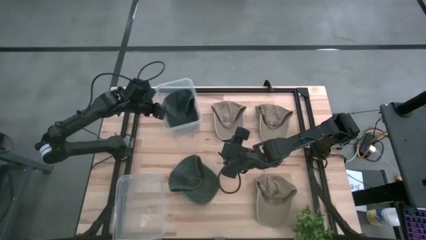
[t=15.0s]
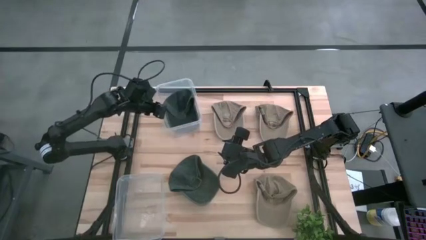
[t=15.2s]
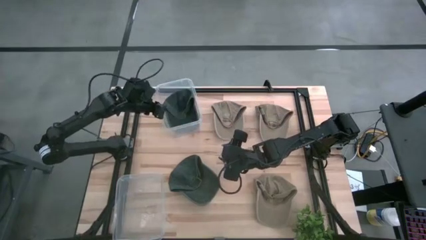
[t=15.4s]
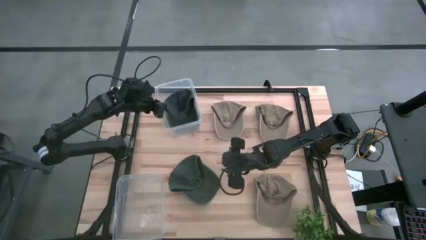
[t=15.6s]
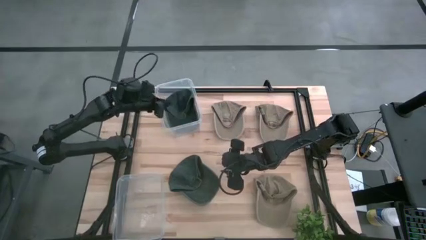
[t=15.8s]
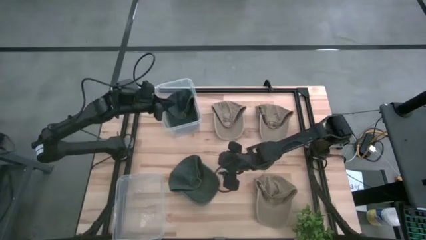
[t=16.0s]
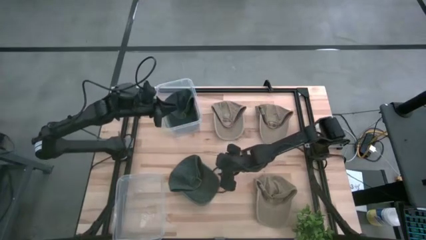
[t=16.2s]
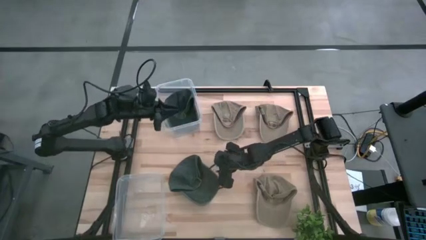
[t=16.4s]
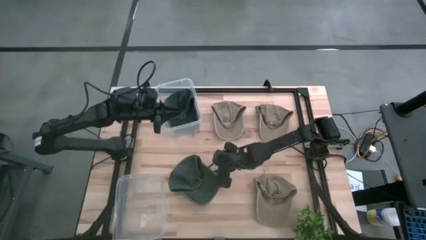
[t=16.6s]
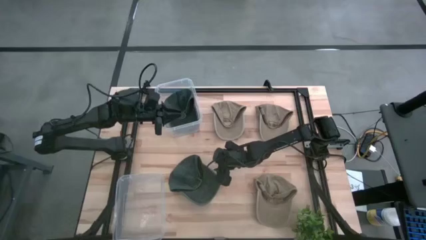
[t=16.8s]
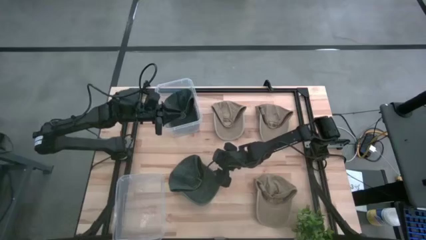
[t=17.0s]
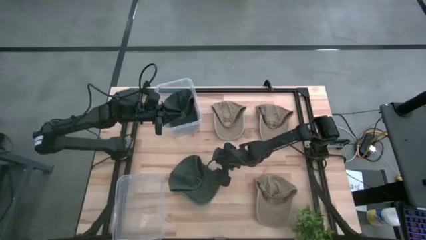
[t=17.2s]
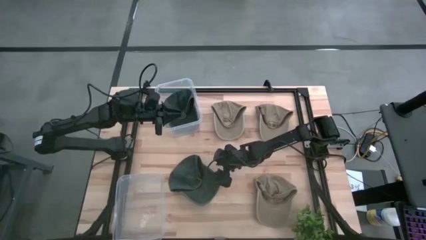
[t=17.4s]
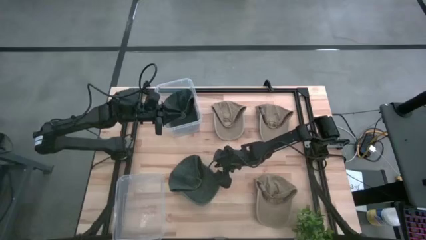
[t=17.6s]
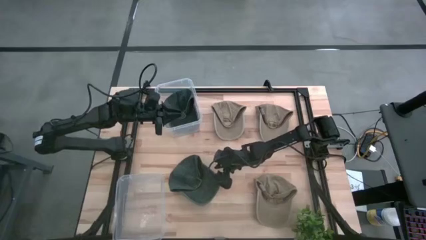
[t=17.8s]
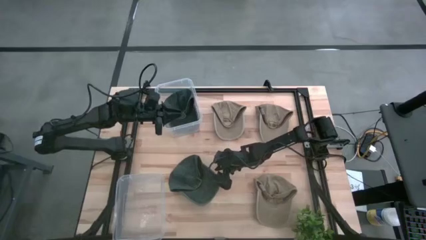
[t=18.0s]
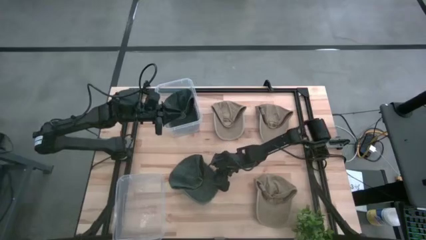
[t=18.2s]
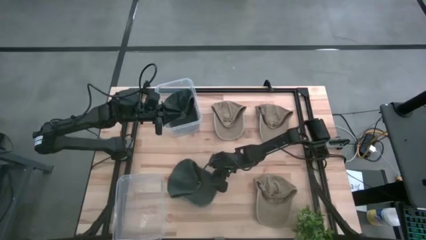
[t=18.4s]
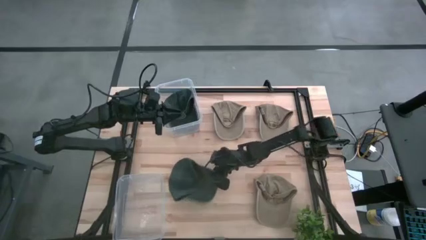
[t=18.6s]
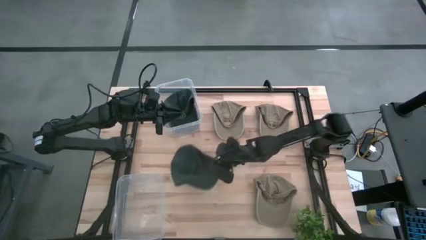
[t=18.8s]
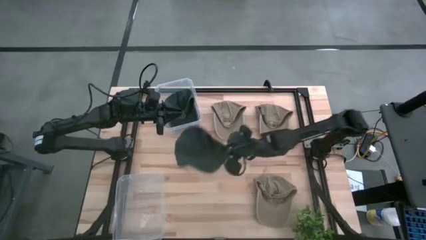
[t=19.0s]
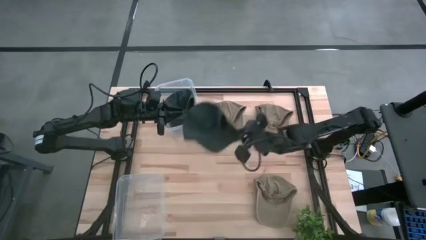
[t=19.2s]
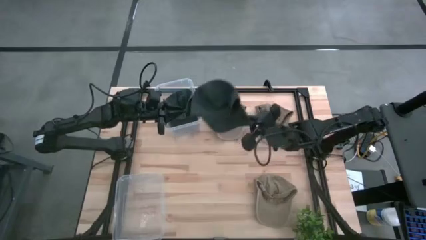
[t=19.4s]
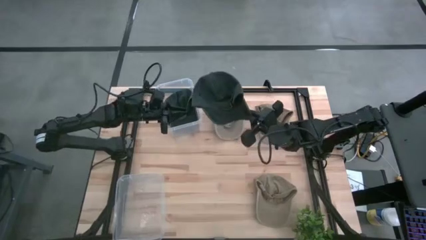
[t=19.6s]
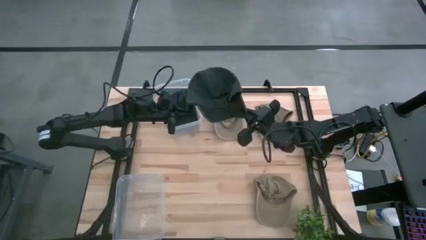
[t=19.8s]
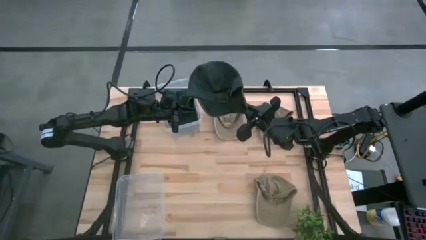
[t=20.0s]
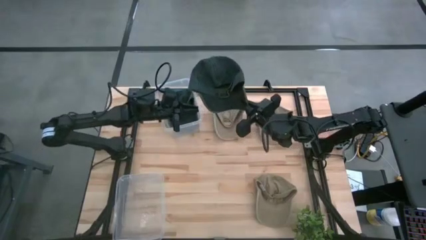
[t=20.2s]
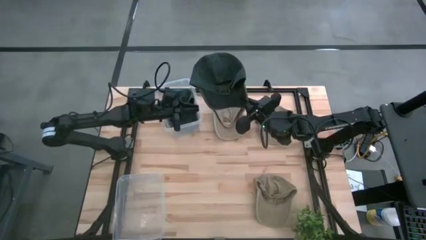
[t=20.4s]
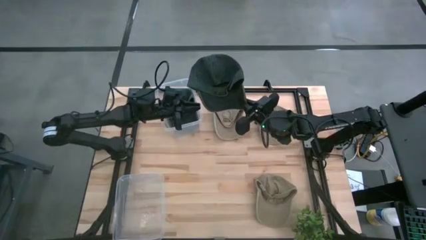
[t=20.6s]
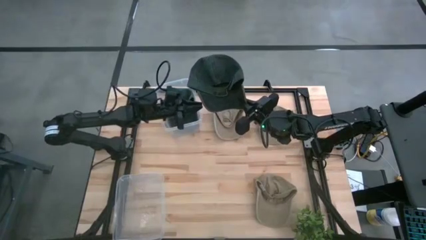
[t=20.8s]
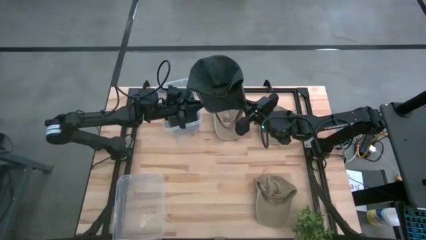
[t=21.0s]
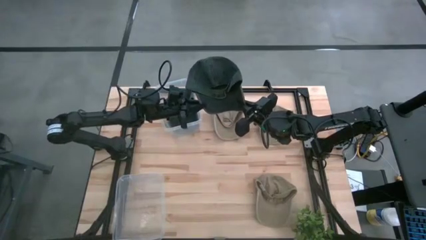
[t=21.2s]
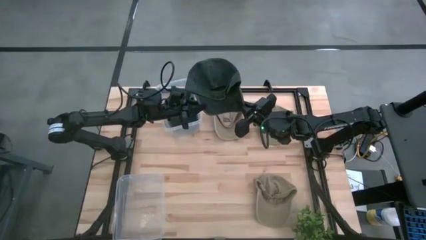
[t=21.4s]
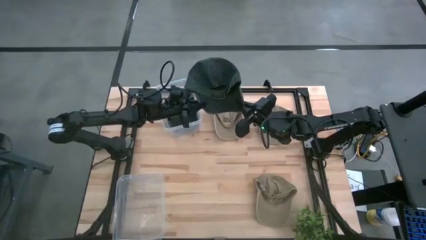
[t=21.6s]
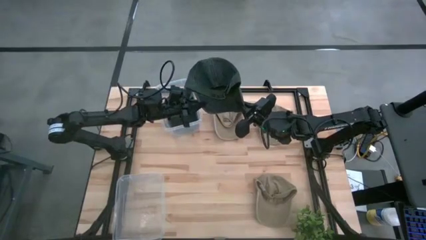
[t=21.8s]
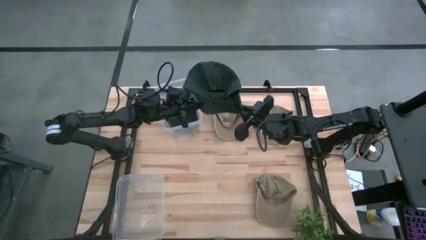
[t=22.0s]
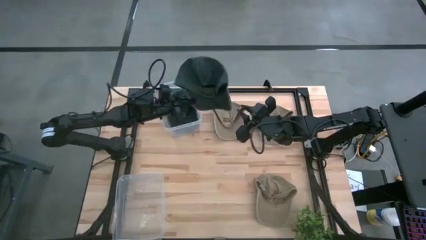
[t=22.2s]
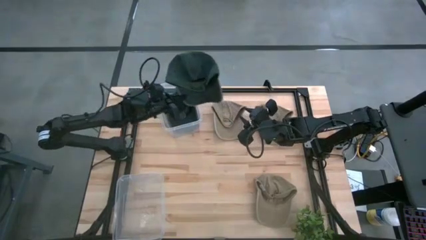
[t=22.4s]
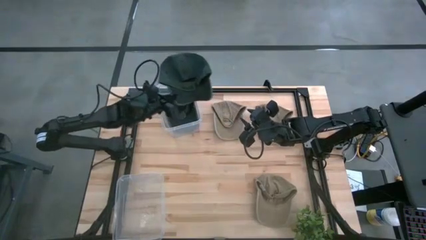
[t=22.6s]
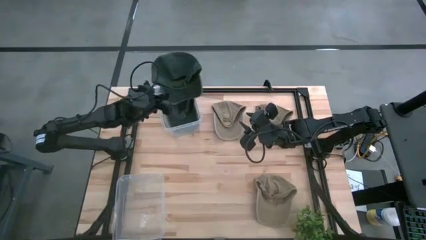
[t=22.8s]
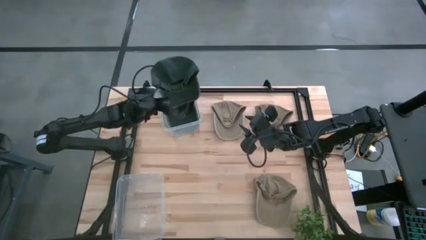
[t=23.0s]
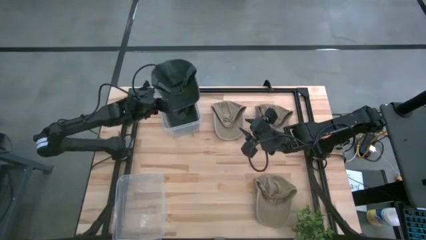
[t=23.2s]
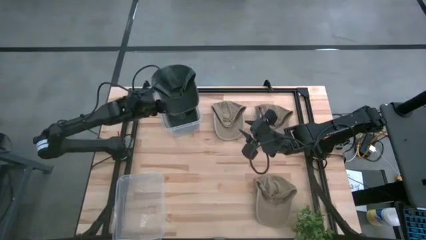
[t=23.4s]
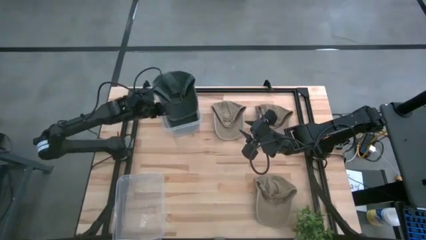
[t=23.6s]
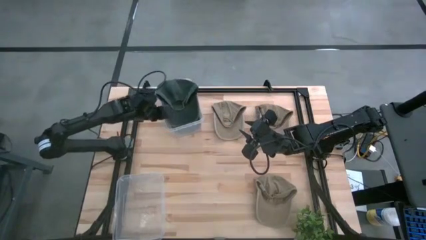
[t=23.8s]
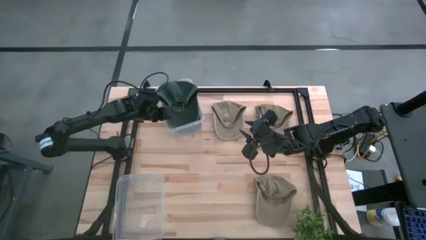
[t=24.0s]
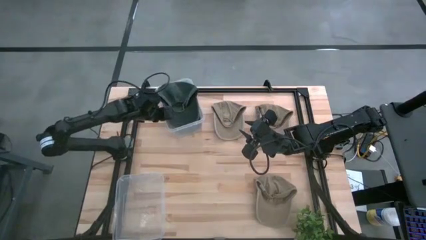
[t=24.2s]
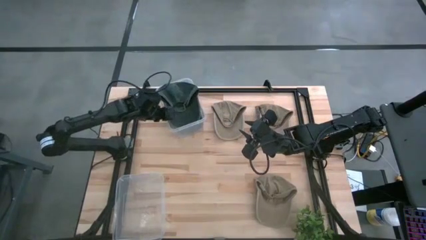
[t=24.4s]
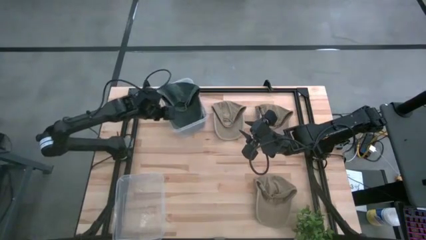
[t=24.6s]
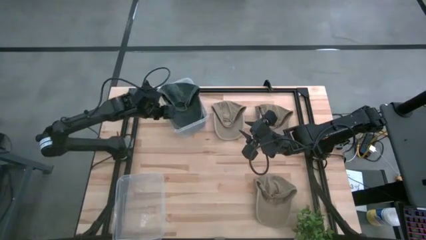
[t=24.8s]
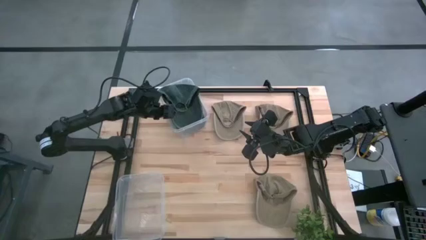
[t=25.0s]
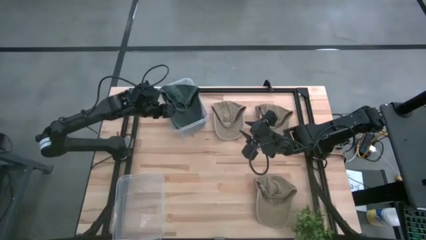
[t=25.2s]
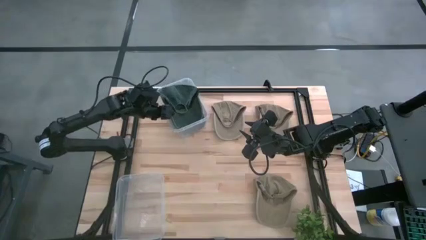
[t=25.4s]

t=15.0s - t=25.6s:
Task: Pick & Place hat
Put the blue cap into the top transparent bin
